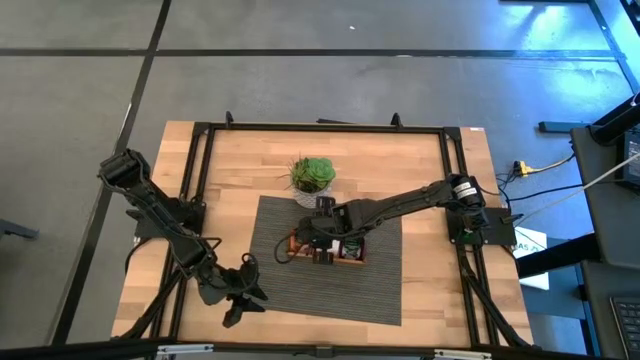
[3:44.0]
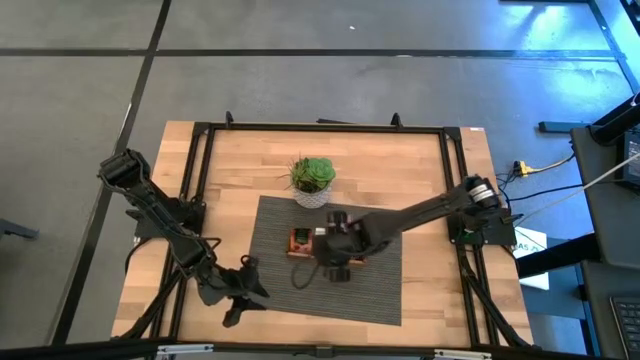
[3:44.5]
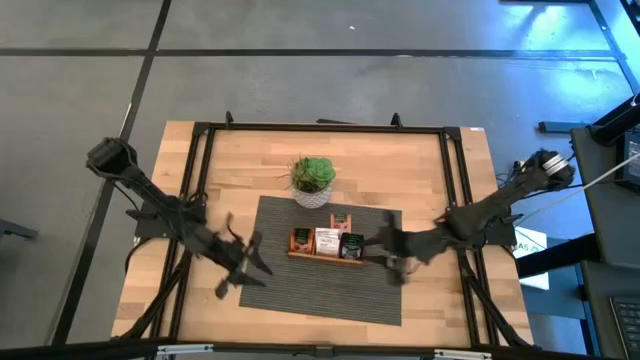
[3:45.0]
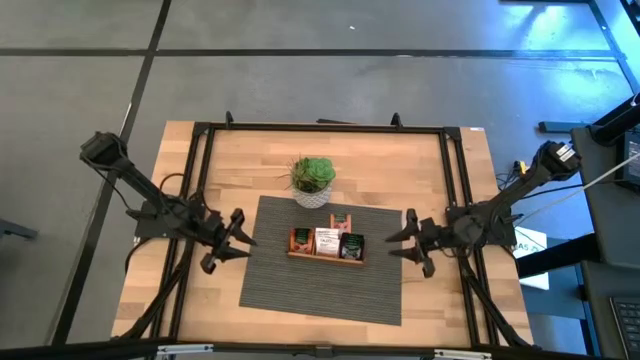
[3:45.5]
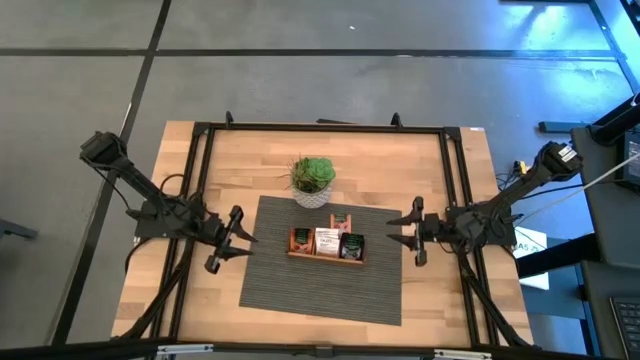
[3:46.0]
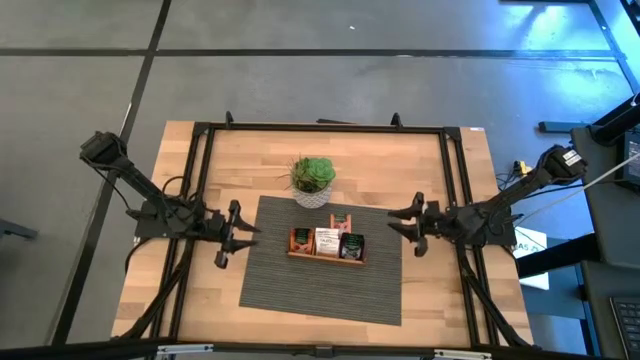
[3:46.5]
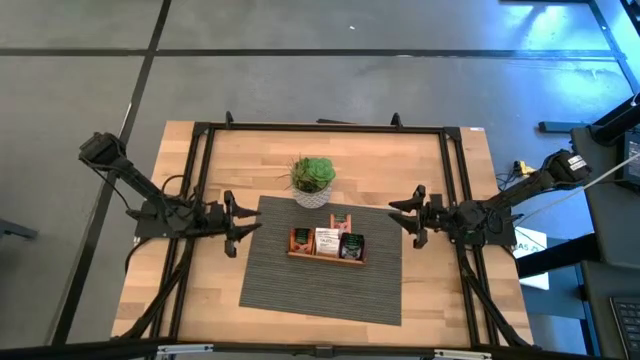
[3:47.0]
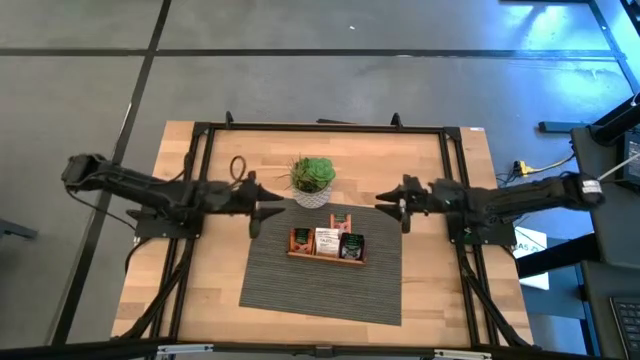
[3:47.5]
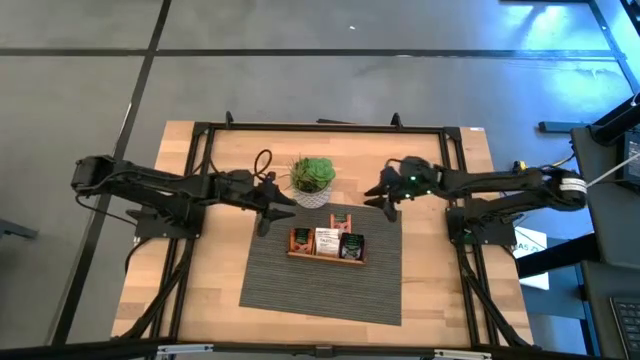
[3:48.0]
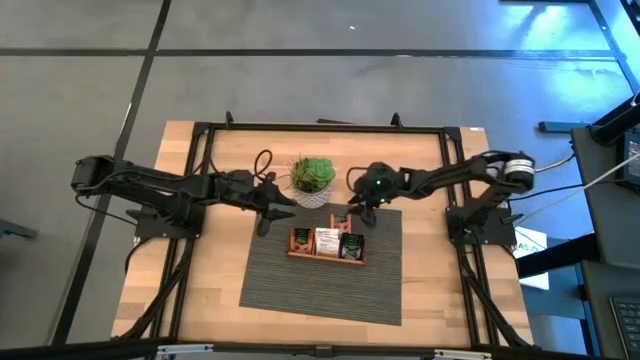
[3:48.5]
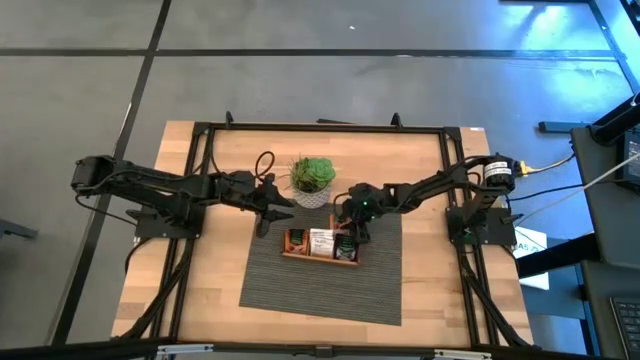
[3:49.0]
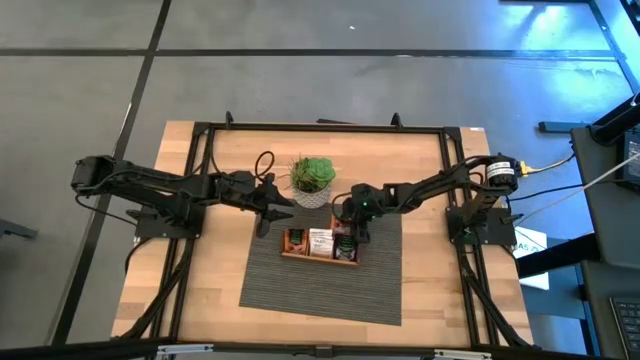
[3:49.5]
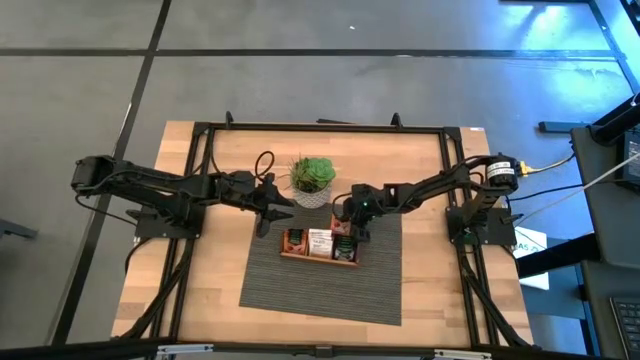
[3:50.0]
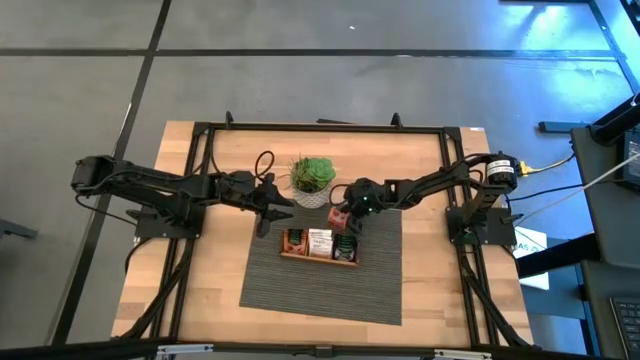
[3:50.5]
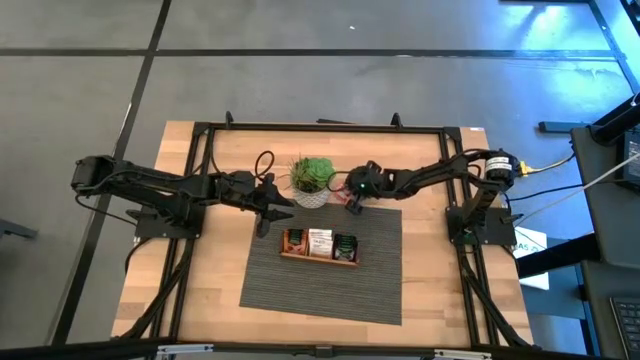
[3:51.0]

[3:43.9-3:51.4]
Task: Pick & Place Tea
Put the orange tea bag into the left section of the wooden organizer

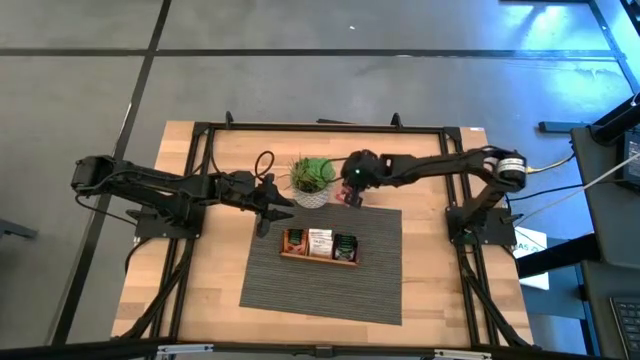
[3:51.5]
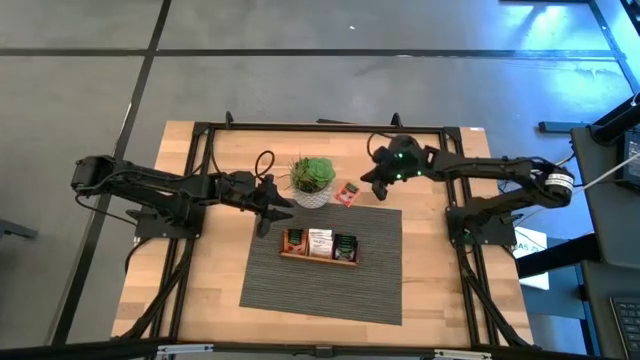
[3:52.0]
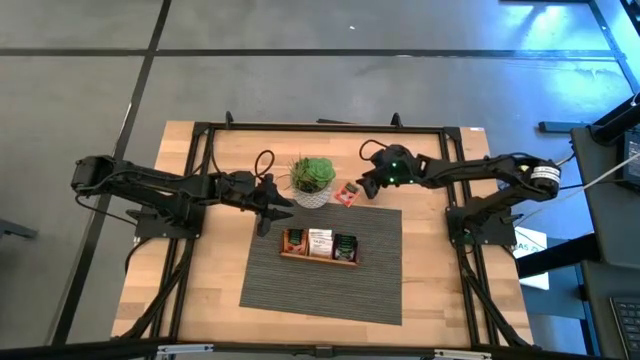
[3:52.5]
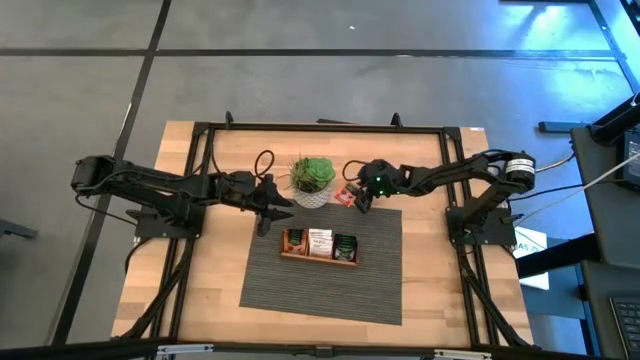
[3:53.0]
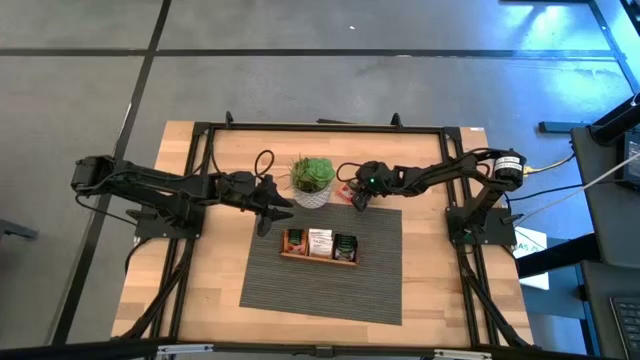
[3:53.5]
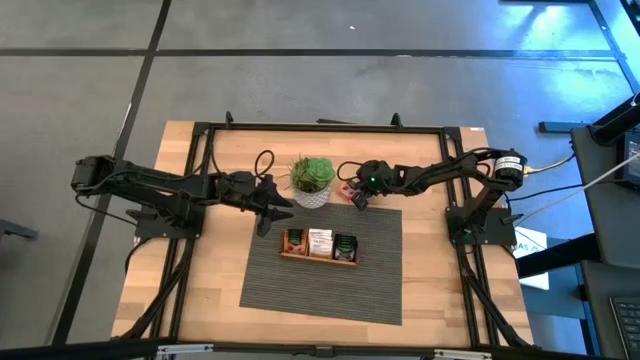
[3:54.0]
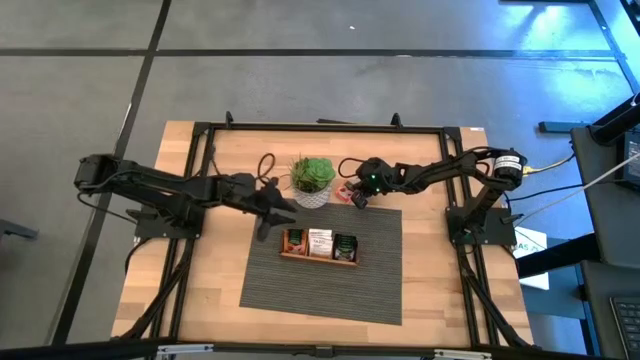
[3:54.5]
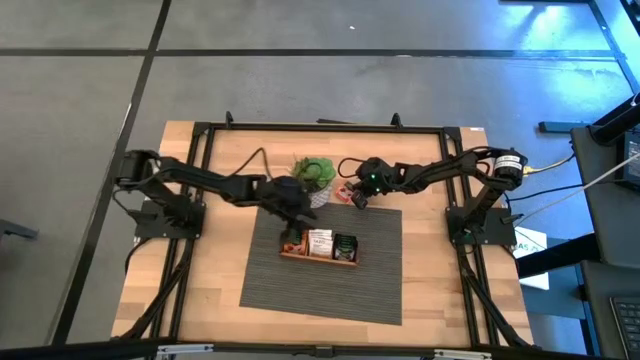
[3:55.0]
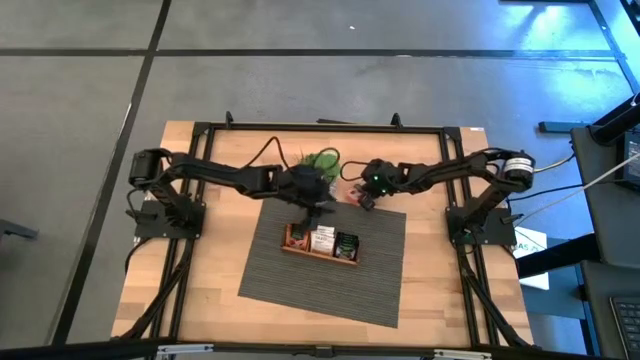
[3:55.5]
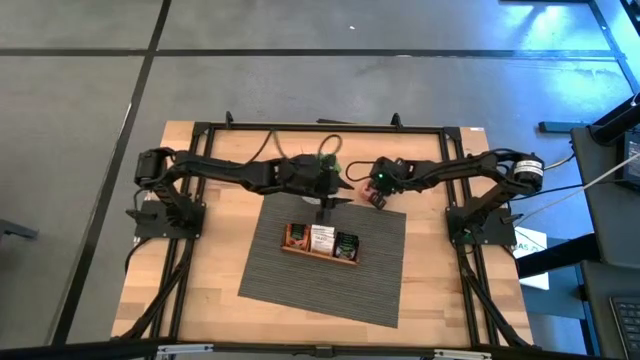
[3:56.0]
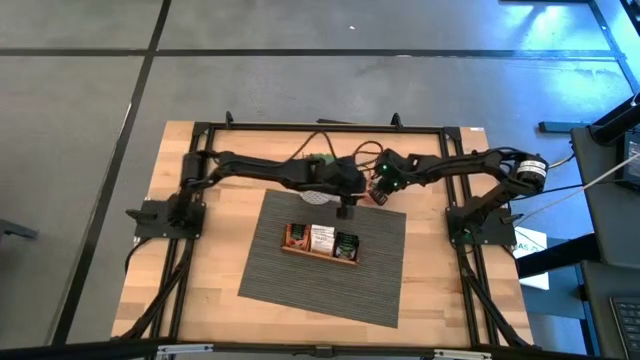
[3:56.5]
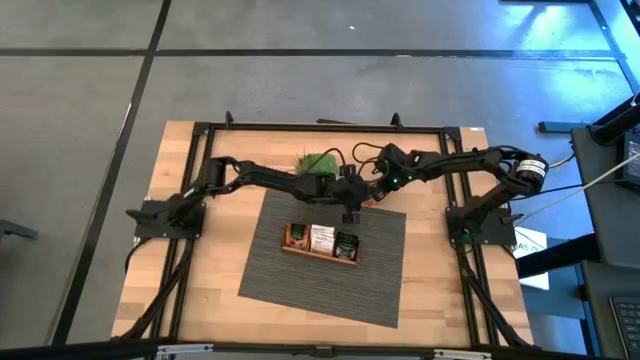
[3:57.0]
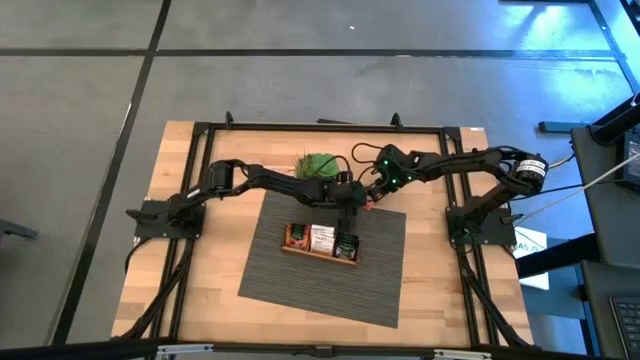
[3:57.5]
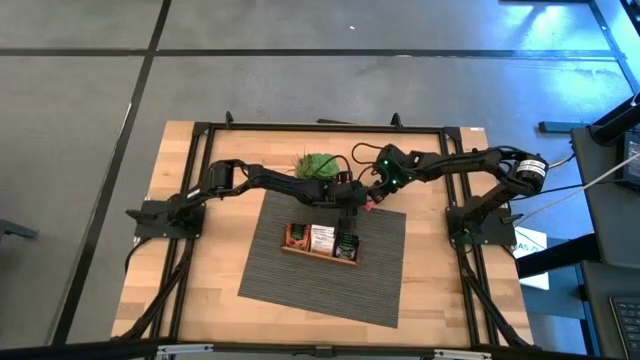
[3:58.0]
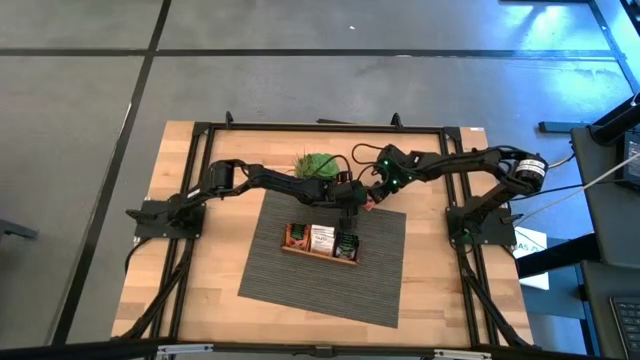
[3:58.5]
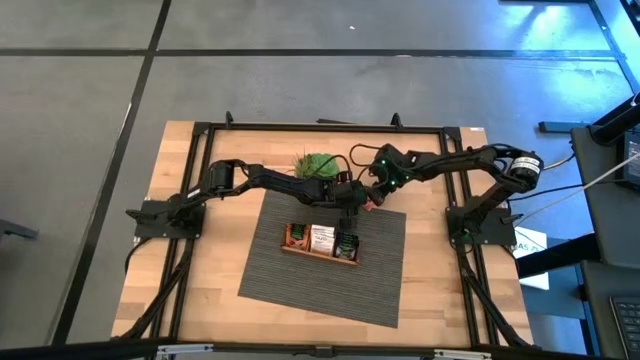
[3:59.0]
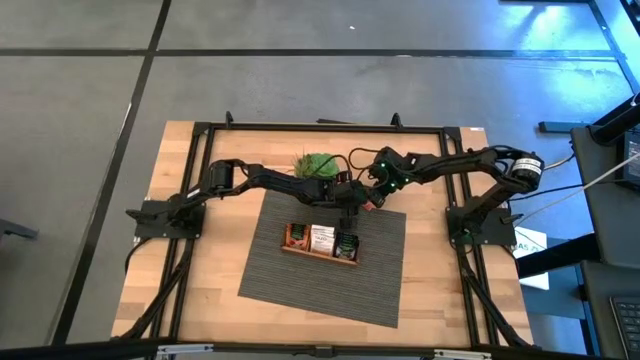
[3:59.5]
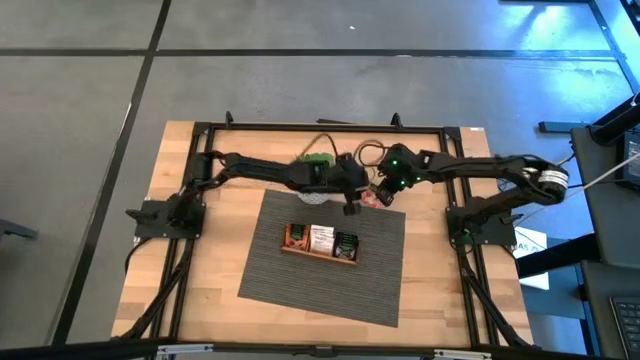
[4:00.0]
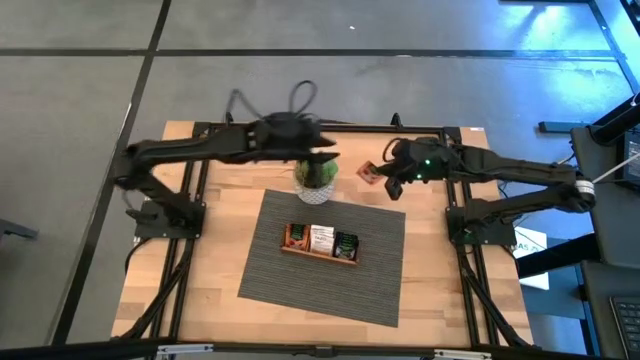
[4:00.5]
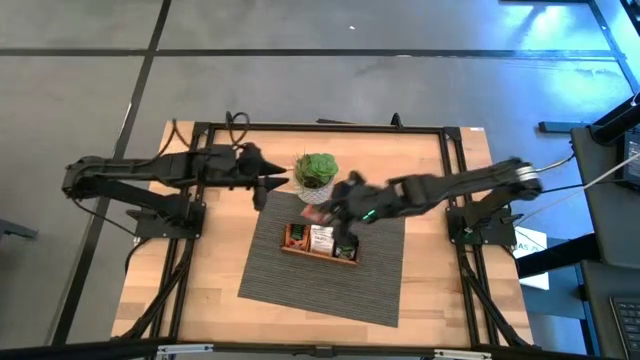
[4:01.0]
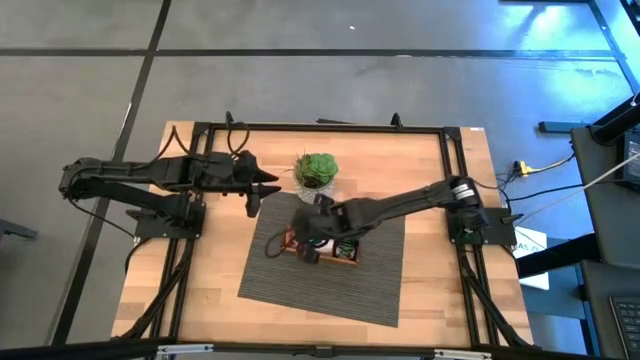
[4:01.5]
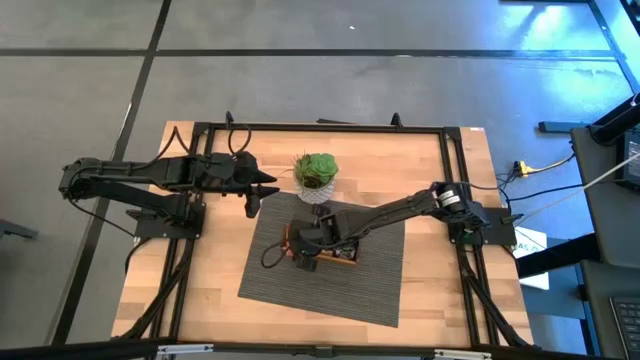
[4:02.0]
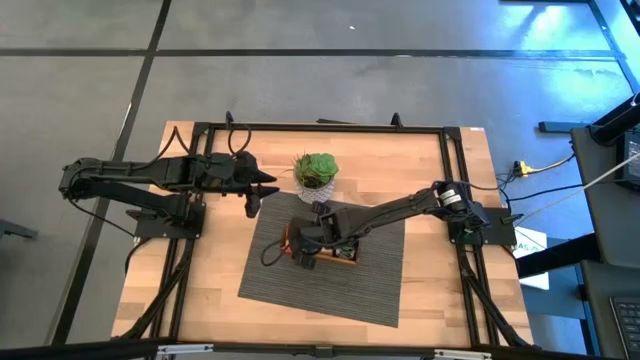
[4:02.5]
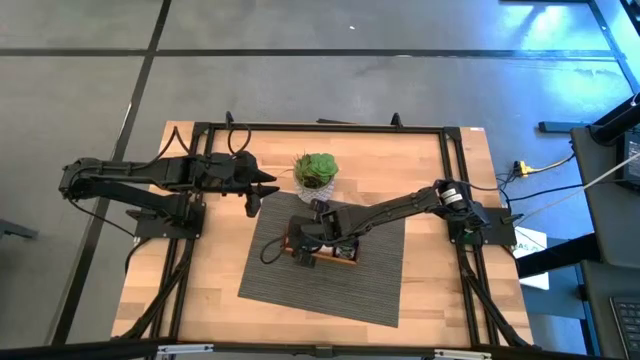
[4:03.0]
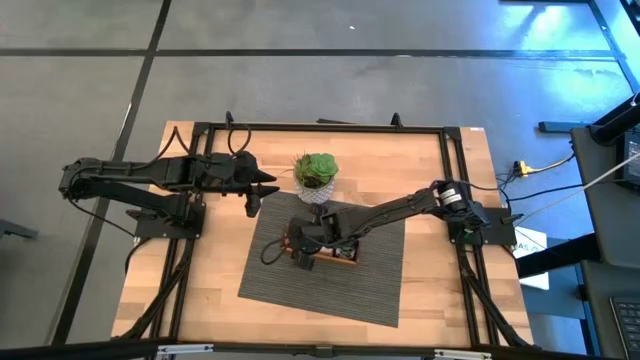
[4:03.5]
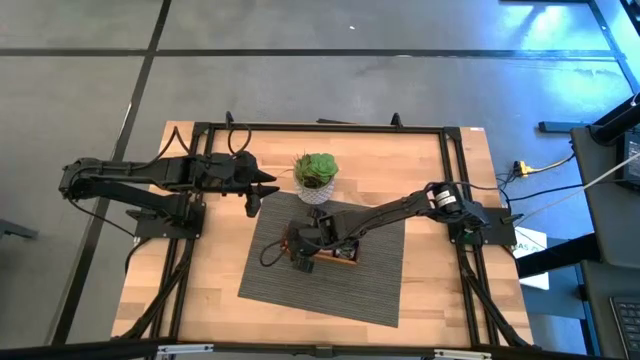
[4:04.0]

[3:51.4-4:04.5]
Put the orange tea bag into the left section of the wooden organizer
